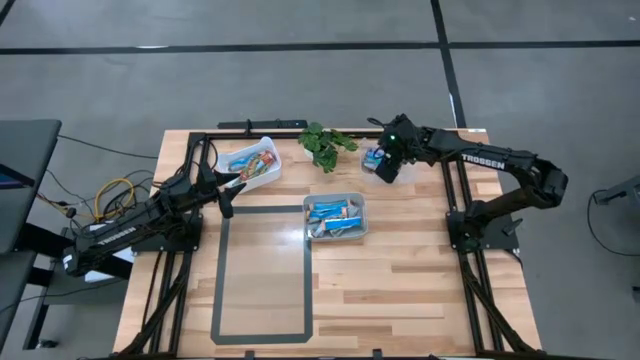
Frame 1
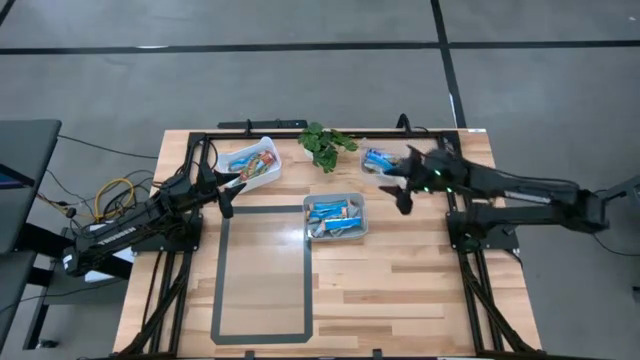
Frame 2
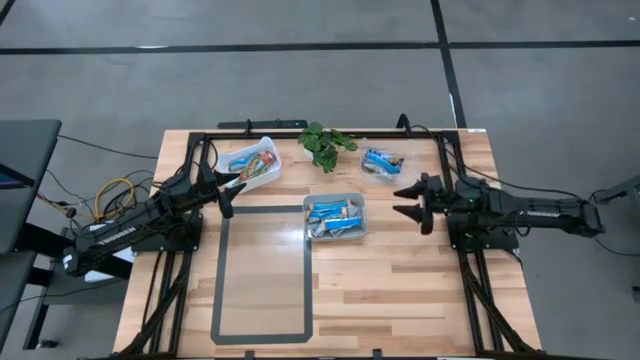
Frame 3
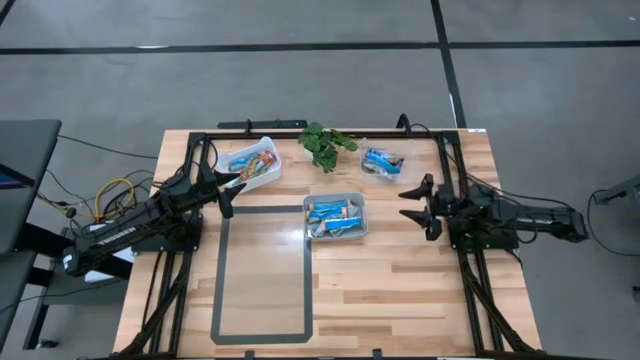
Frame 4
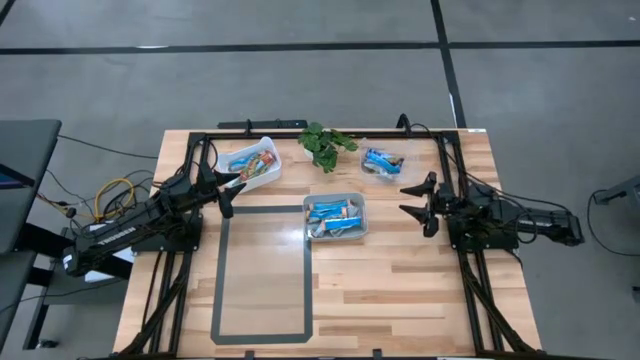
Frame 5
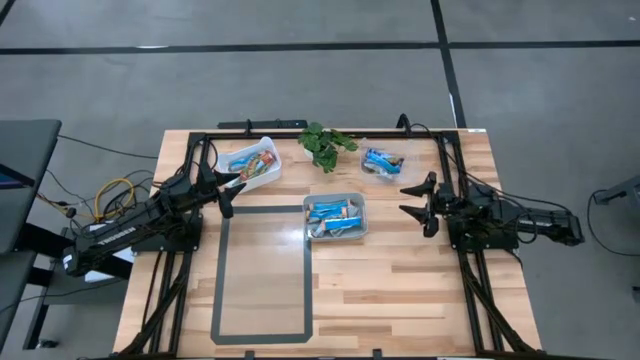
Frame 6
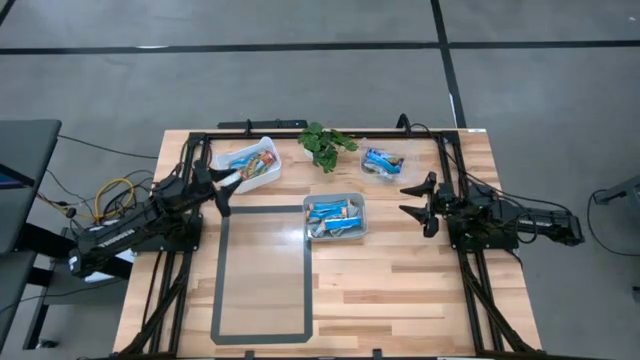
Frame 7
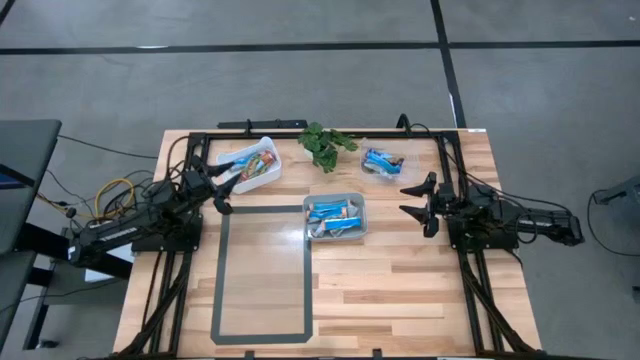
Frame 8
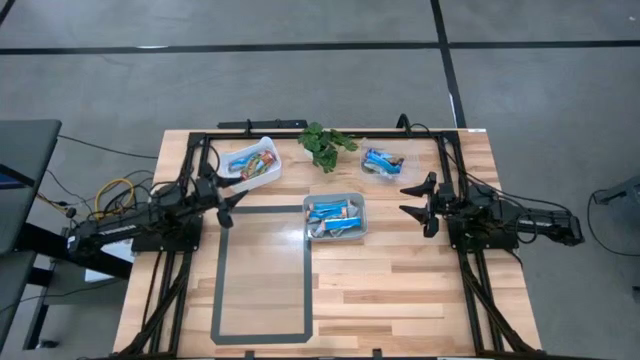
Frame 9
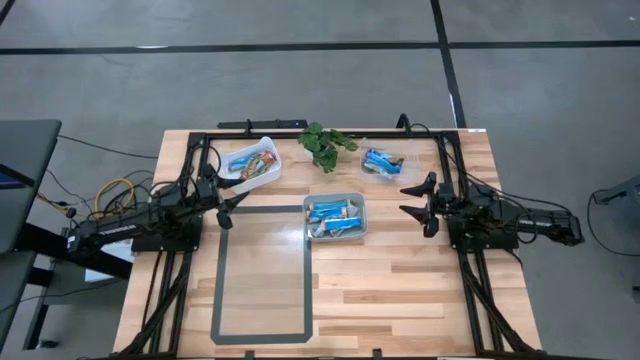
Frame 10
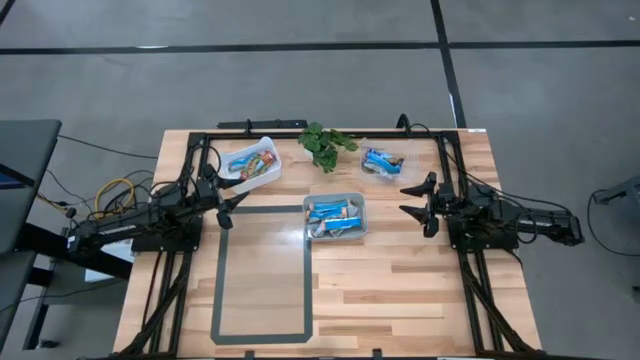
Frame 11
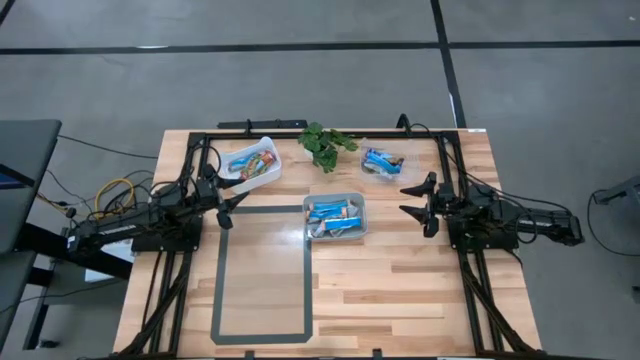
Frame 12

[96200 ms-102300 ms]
Task: Pick and place Granola Bars by type
Return to Home Position

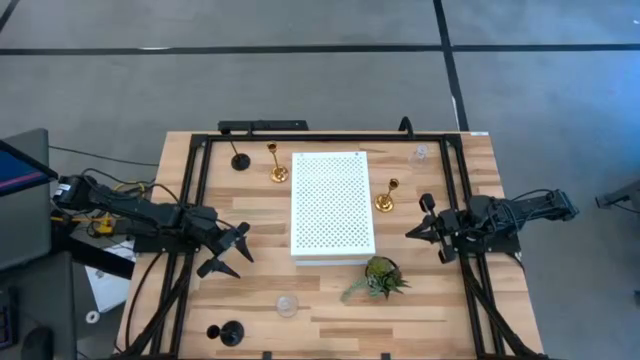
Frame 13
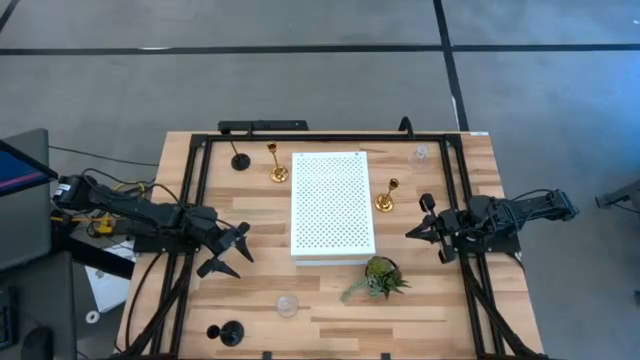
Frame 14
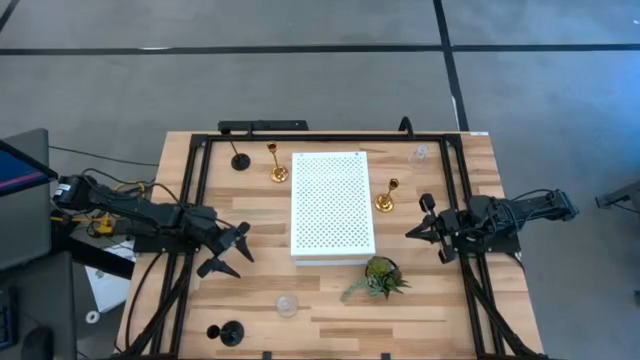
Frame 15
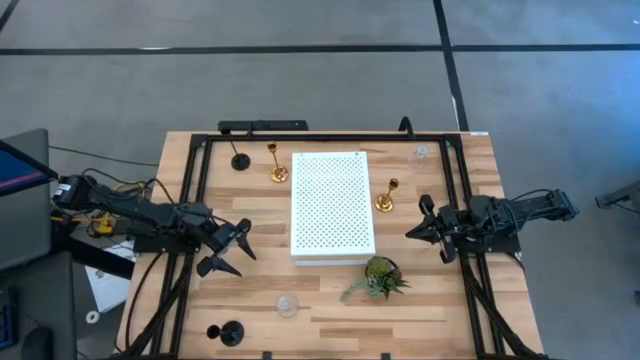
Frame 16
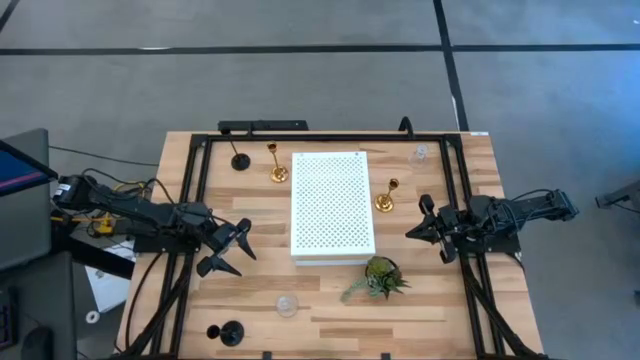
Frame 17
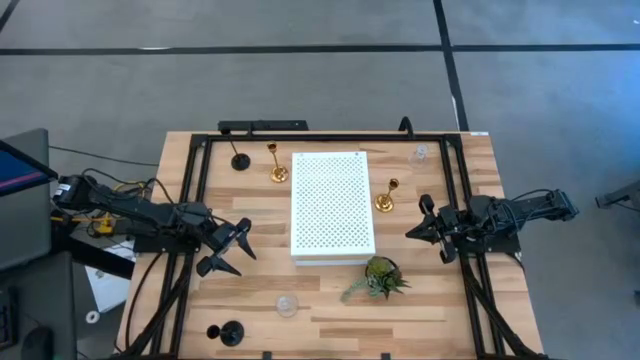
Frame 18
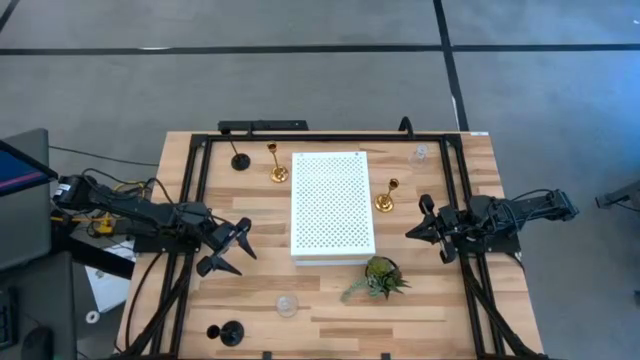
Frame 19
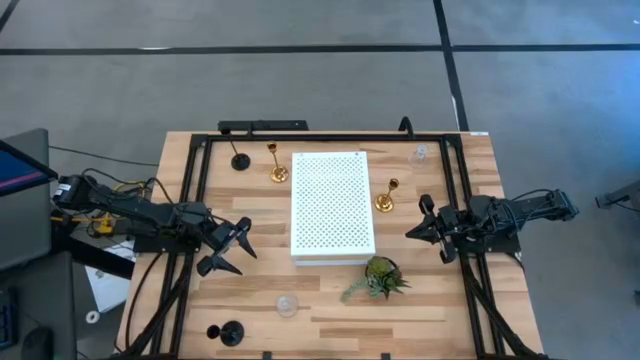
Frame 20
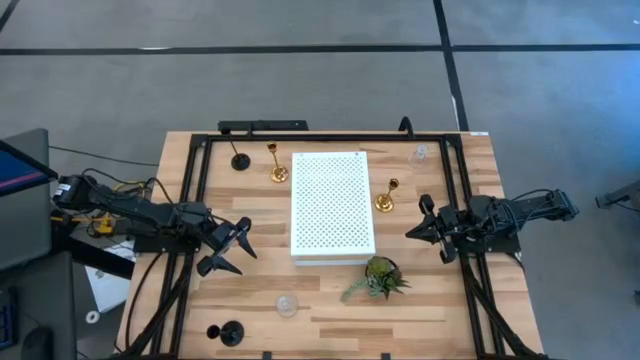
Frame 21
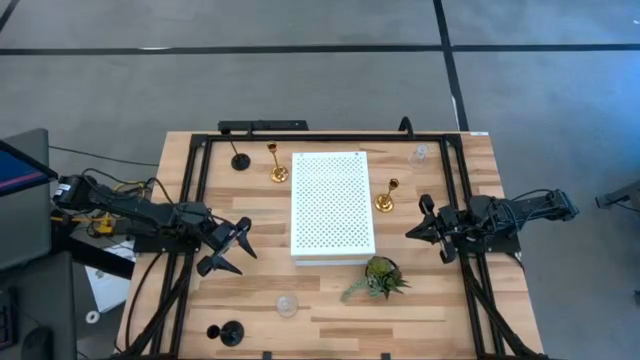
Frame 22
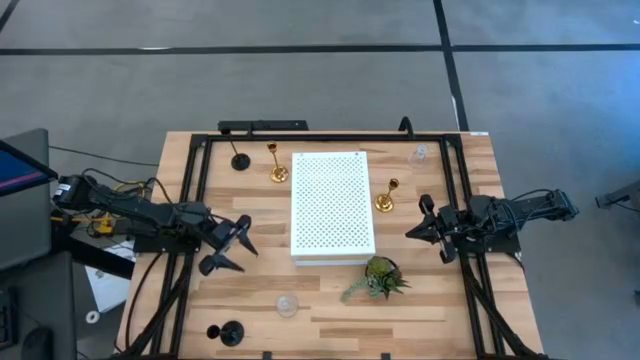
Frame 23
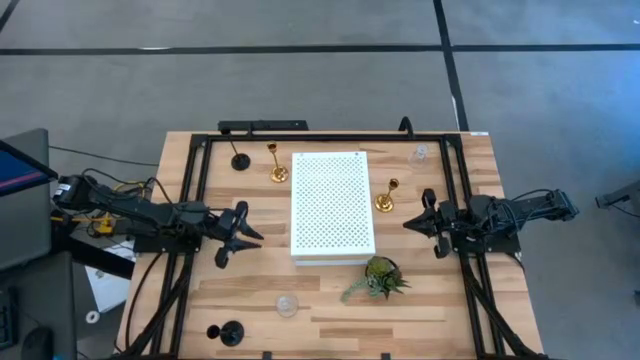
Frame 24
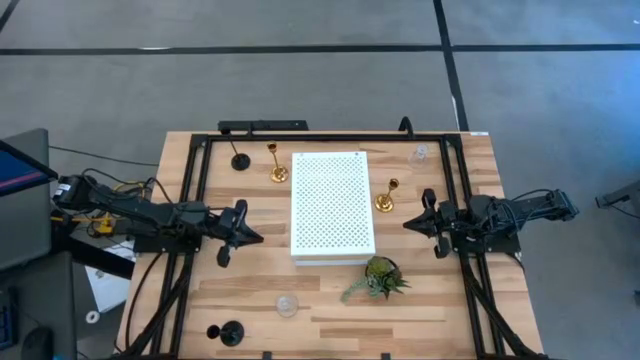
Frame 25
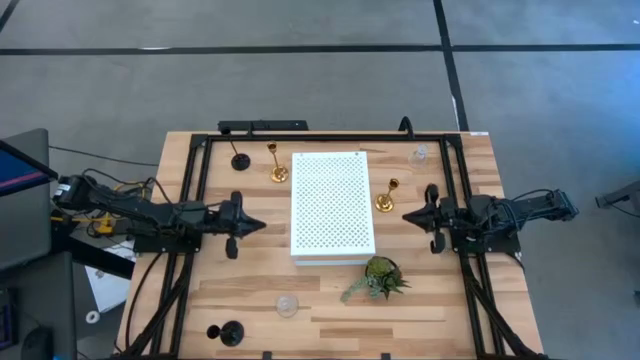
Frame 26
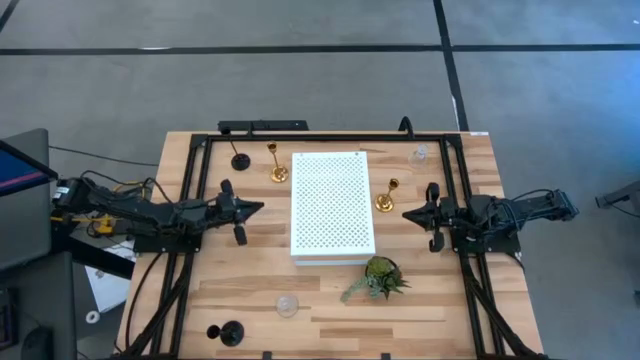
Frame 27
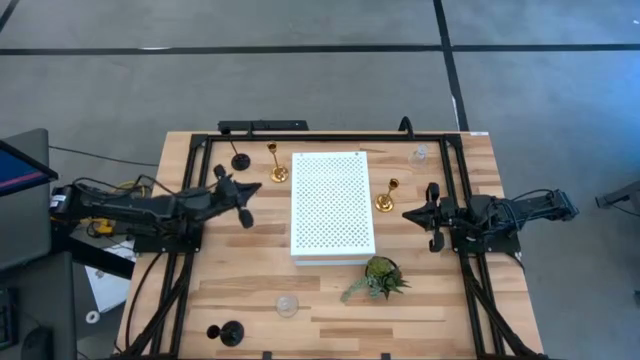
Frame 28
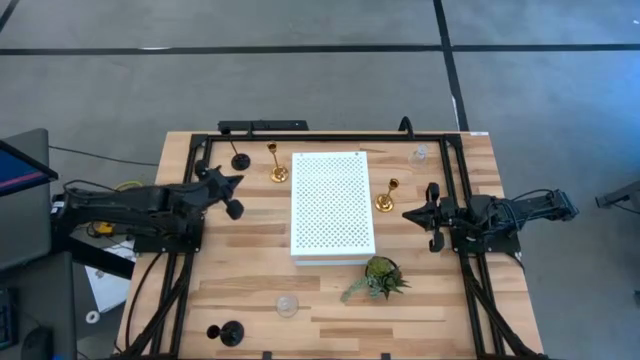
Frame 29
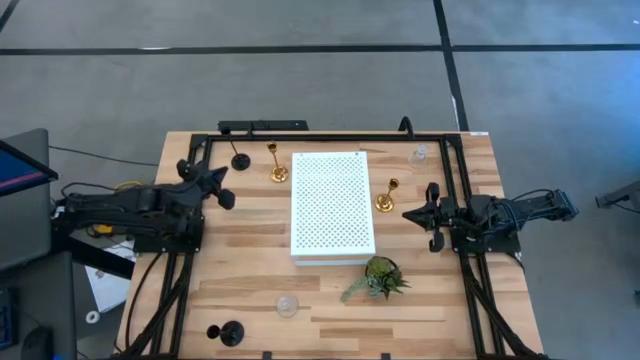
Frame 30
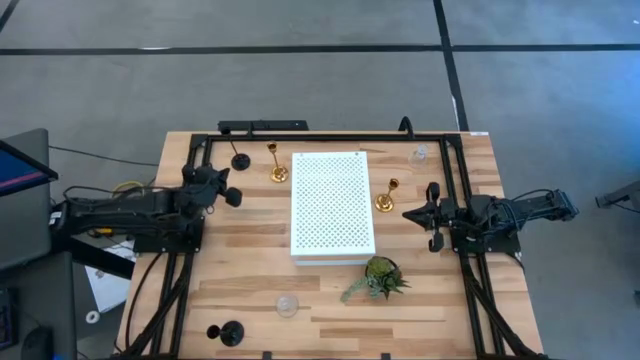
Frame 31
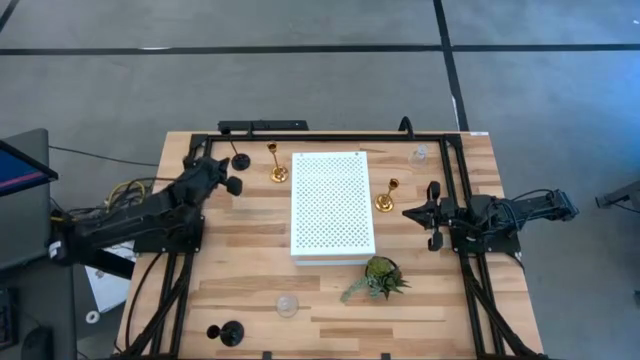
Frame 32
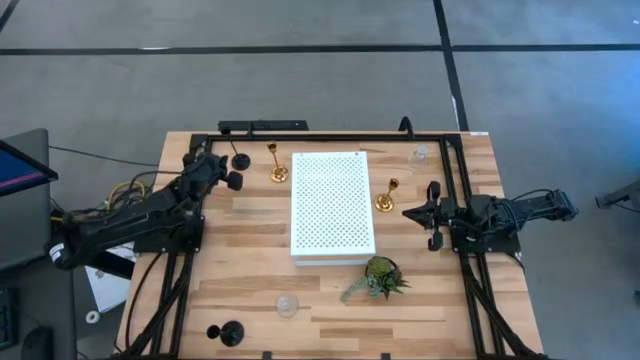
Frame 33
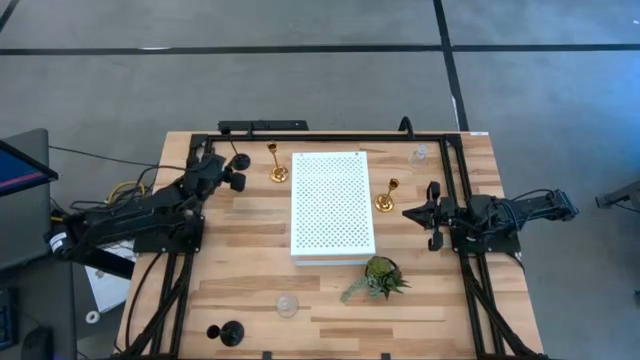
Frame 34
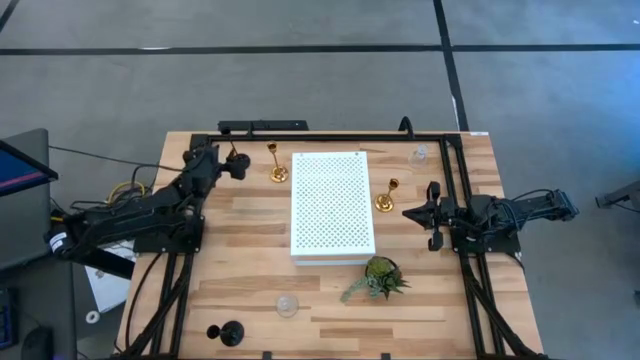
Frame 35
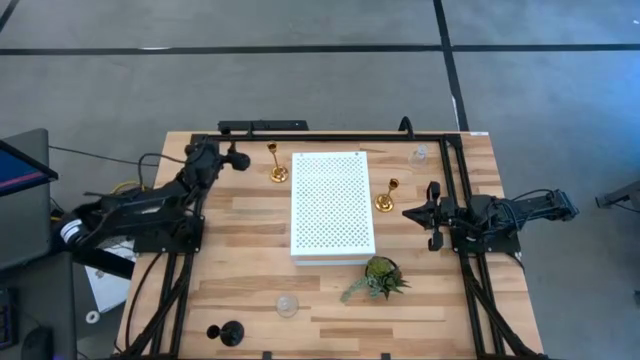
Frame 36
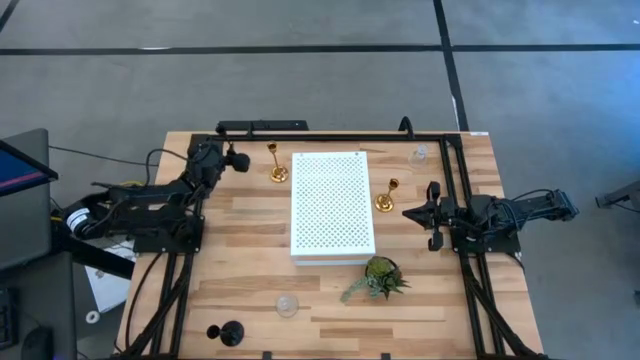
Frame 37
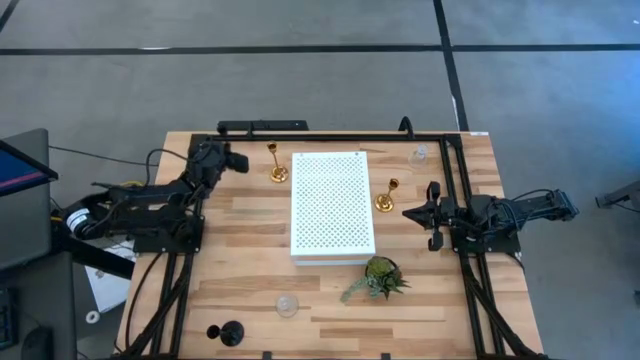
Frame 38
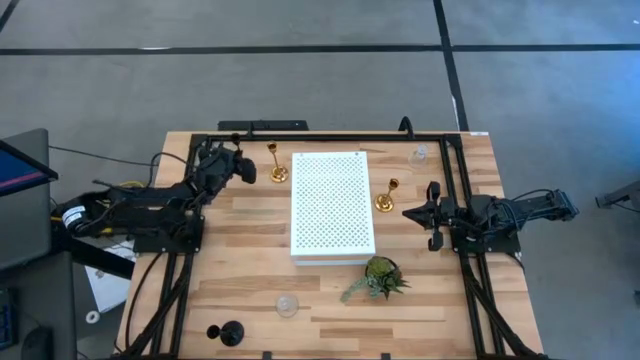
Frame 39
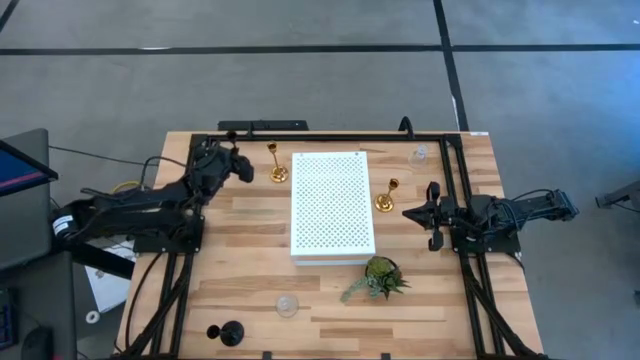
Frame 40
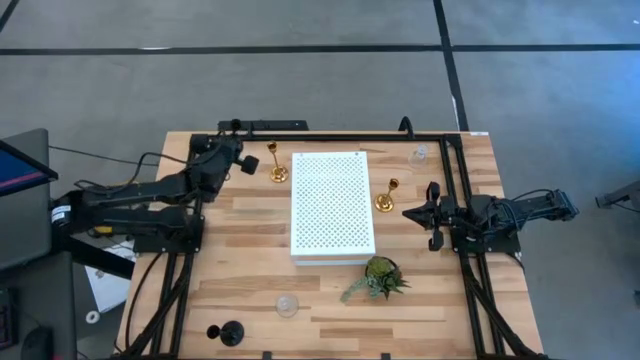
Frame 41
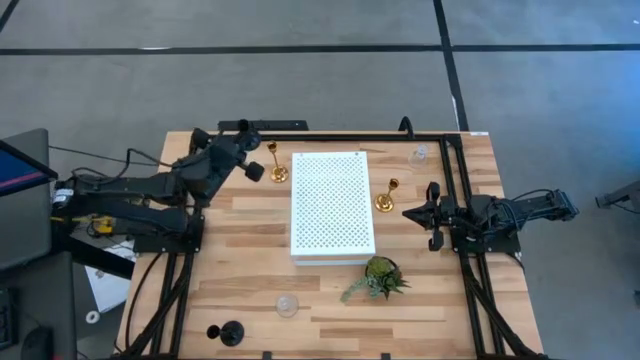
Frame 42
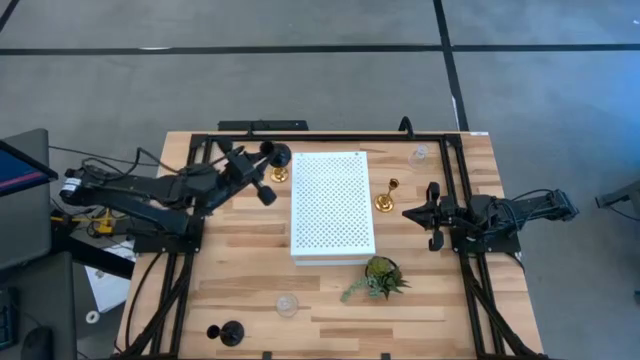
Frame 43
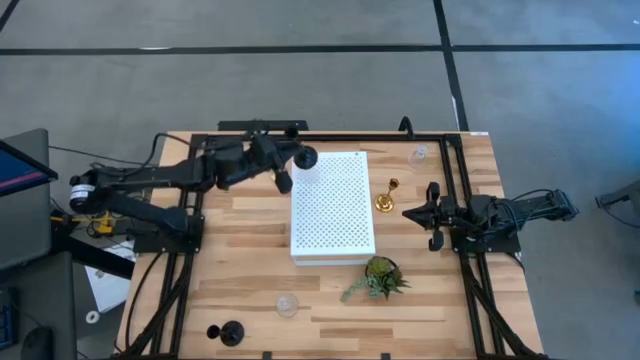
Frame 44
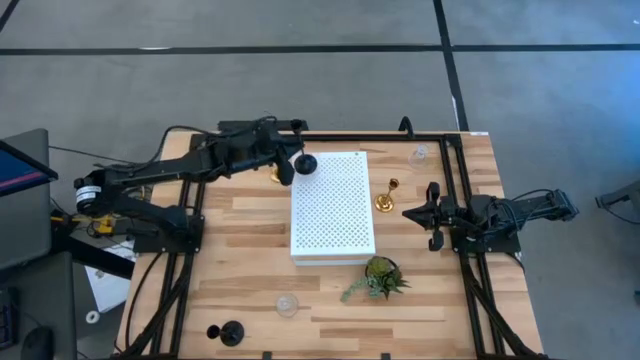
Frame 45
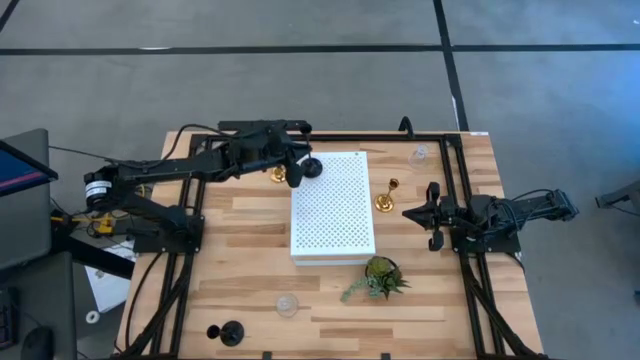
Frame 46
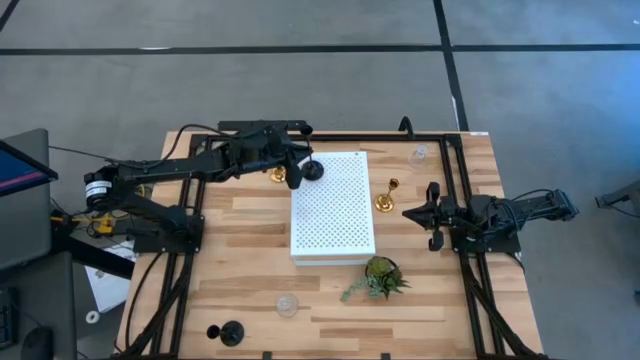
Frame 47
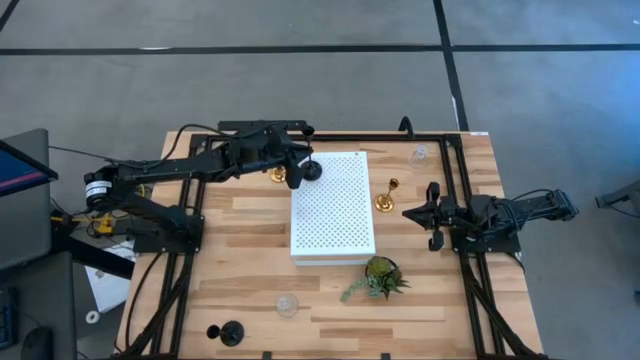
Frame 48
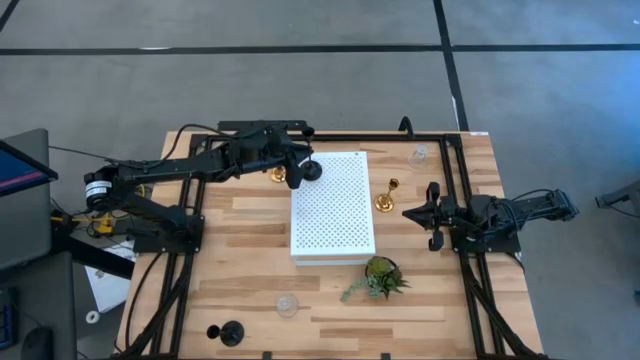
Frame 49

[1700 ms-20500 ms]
Task: Pick & Place candle stick holders
Put the top black candle holder on the shelf
